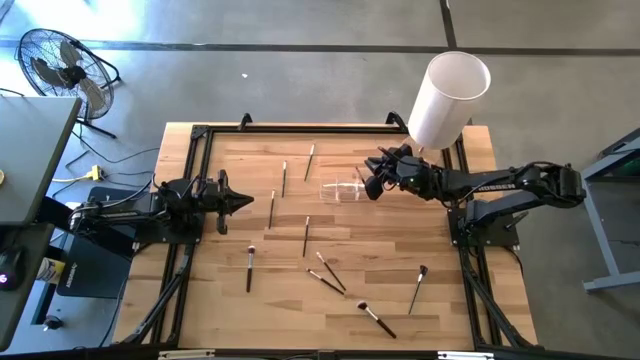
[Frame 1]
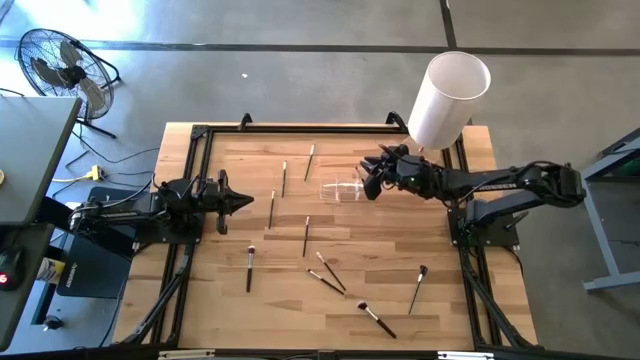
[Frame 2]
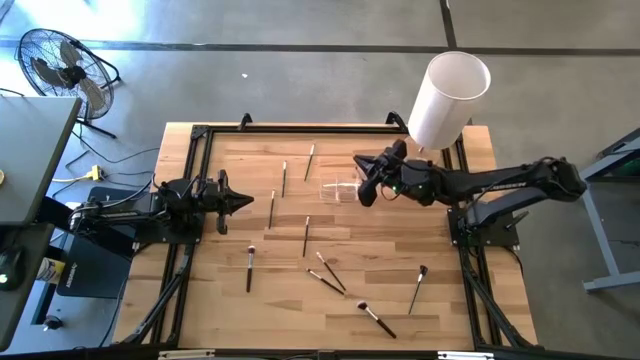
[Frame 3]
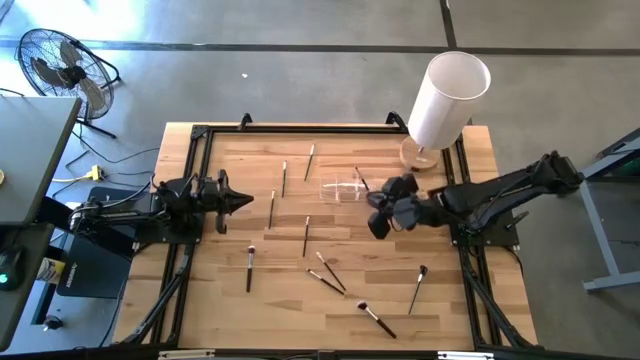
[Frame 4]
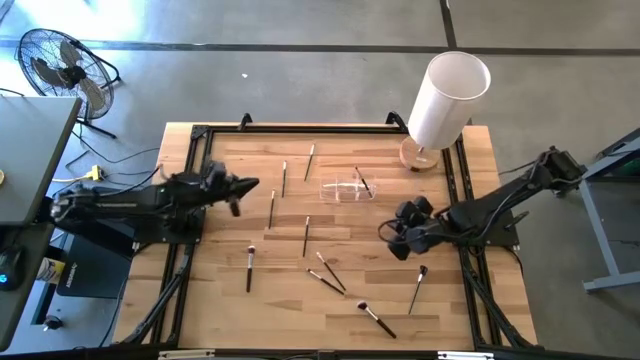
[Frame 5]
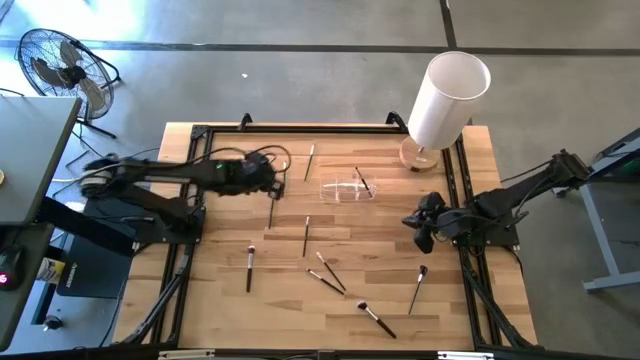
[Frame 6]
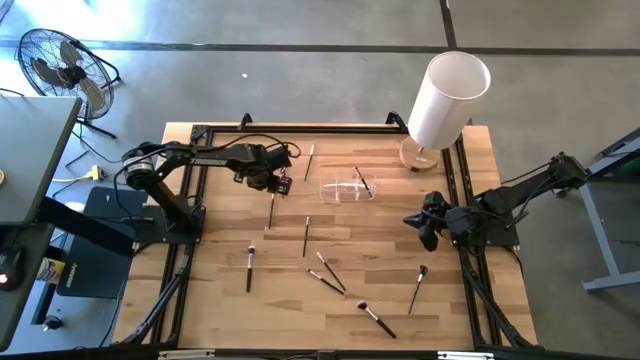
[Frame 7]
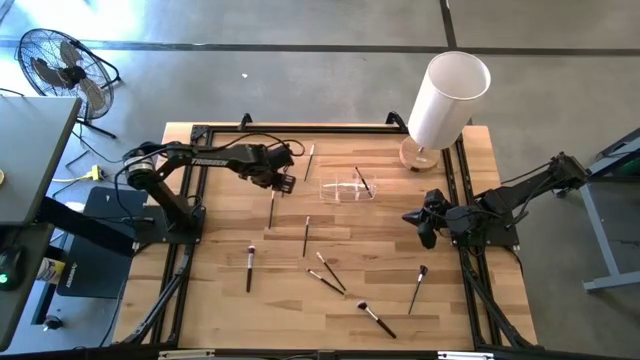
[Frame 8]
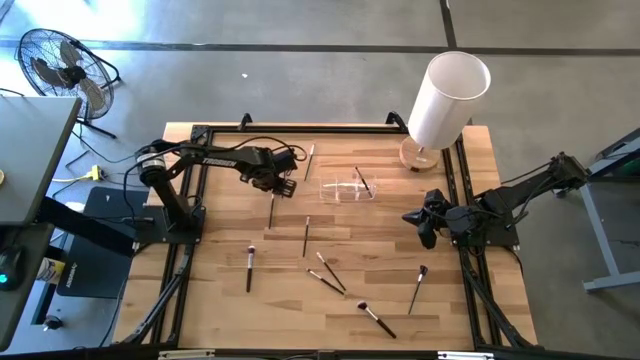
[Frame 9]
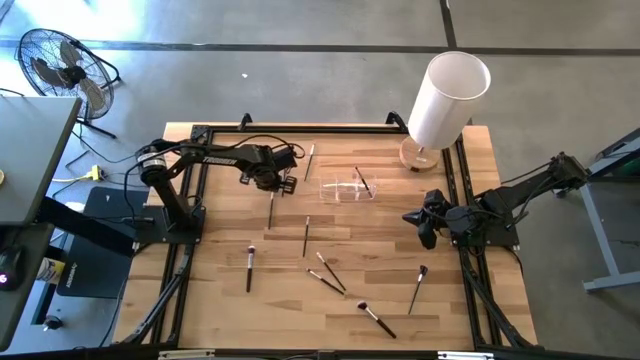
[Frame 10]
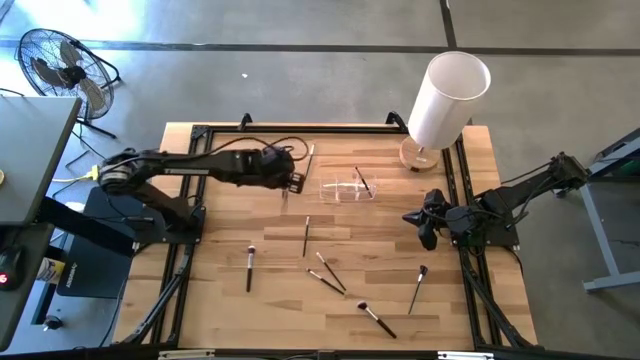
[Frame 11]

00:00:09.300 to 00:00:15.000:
Task: Put items in baskets/containers
Put the eyeshadow brush into the left section of the transparent organizer

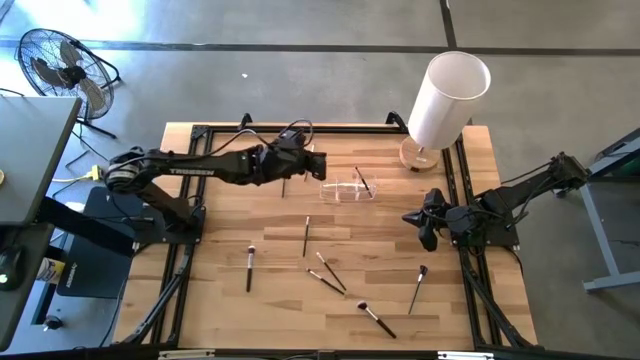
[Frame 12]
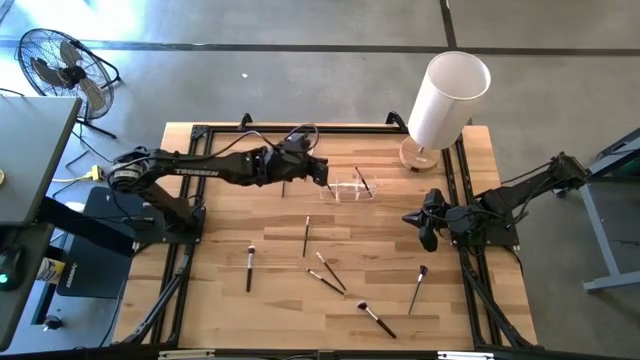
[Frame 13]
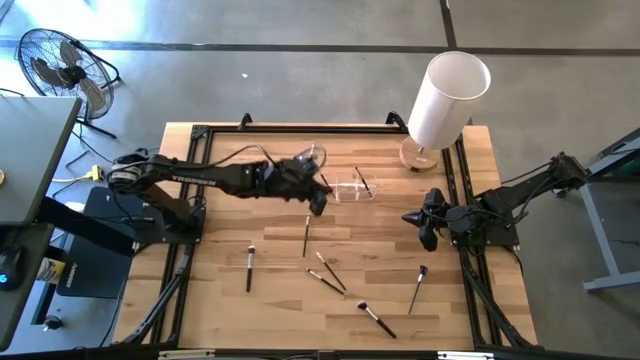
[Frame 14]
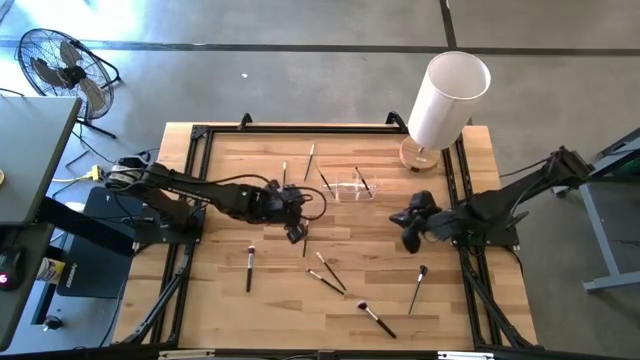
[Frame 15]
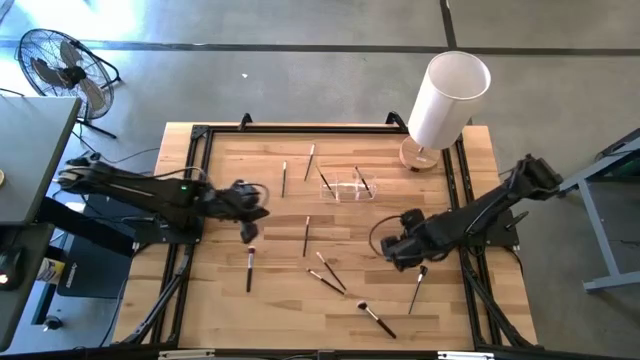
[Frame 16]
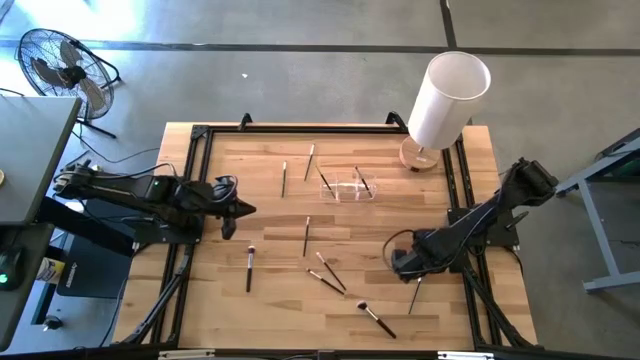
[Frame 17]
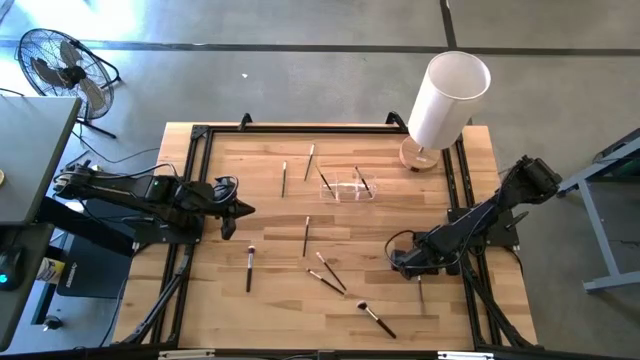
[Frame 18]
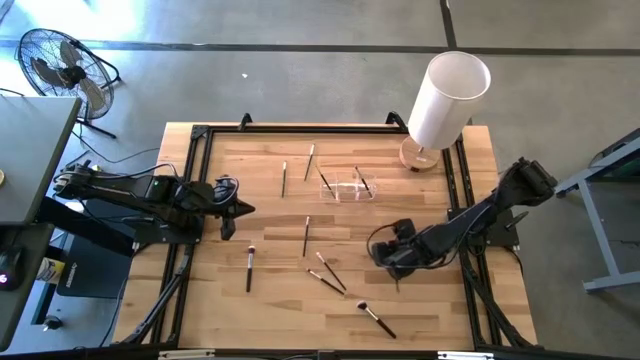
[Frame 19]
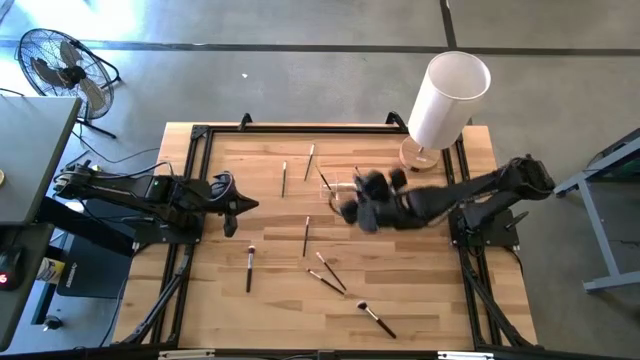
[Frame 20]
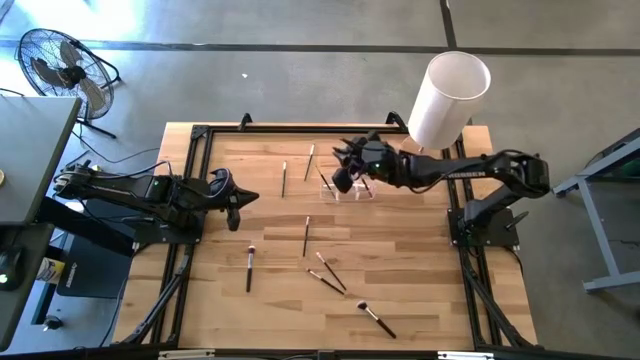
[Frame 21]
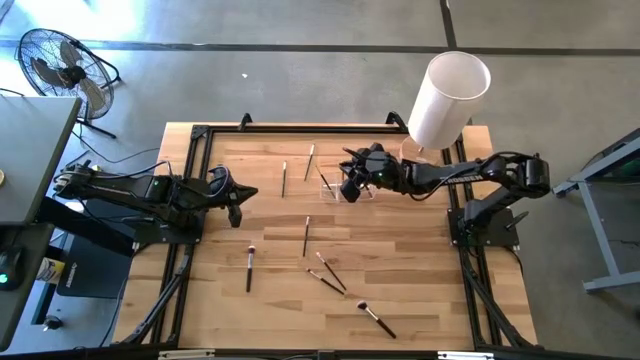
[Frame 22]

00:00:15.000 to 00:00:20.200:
Put the brow brush into the middle section of the transparent organizer

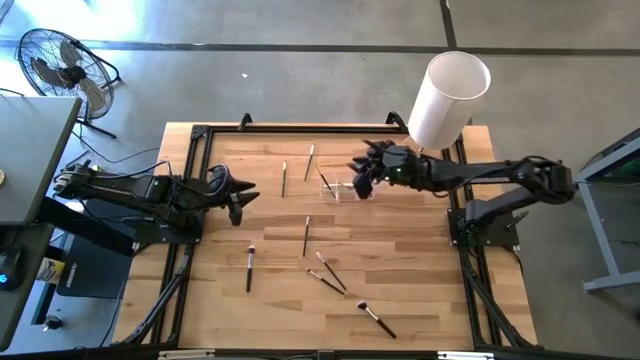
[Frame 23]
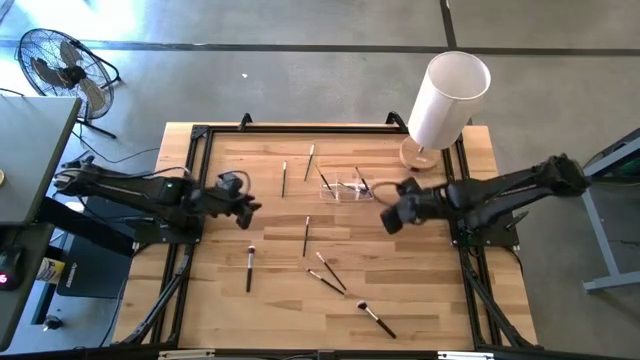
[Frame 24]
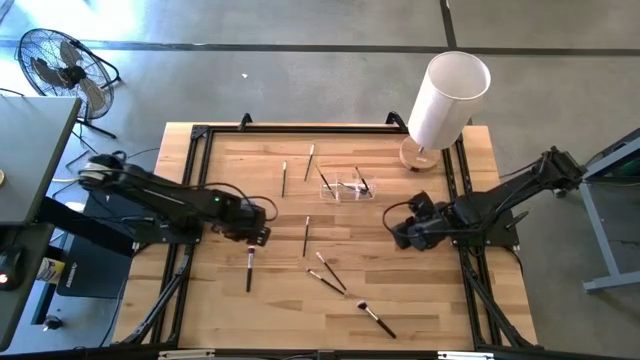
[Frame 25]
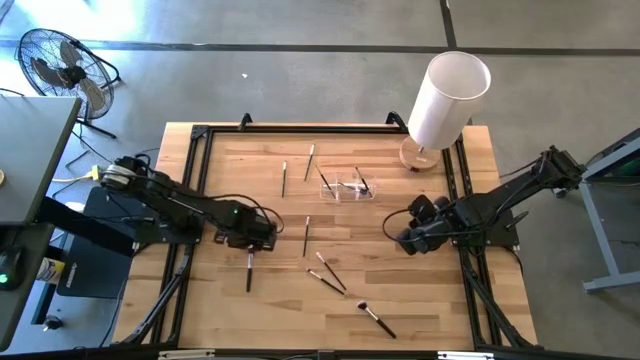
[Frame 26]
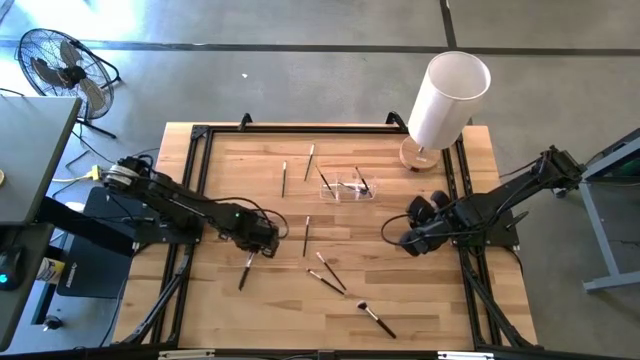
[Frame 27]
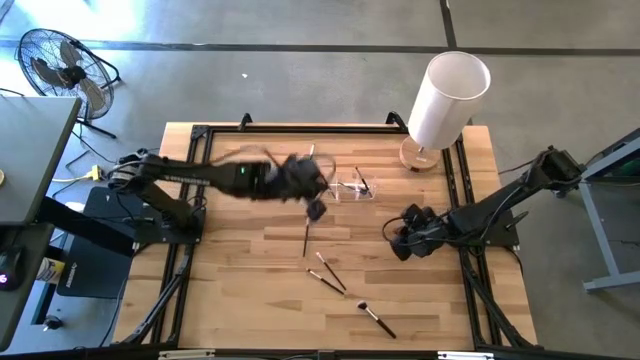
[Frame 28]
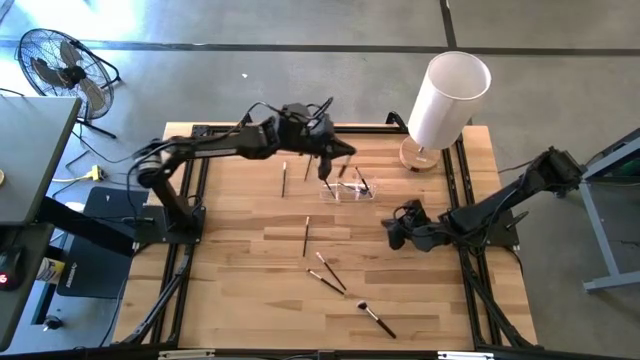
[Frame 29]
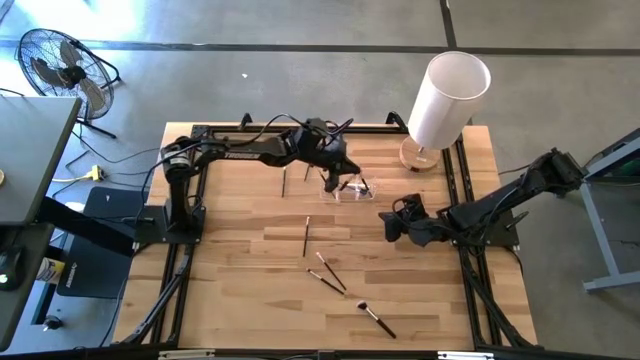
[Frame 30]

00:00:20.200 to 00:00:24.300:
Put the eyeshadow brush into the middle section of the transparent organizer

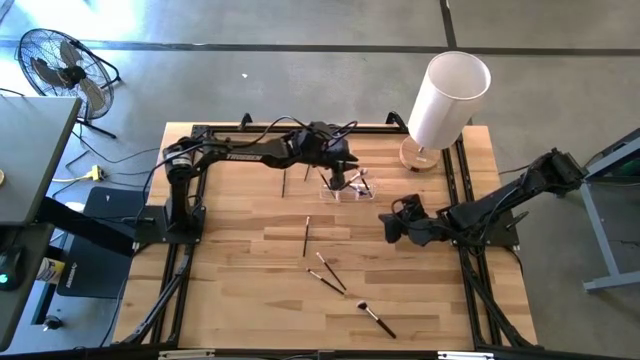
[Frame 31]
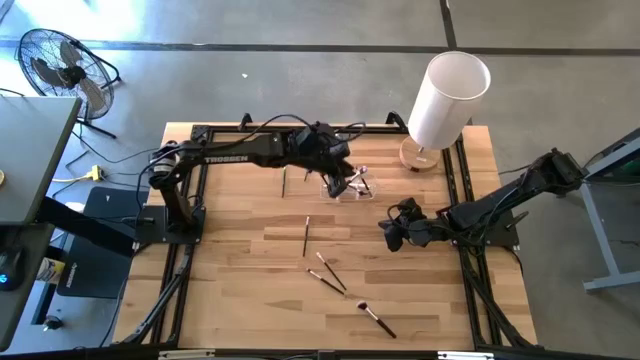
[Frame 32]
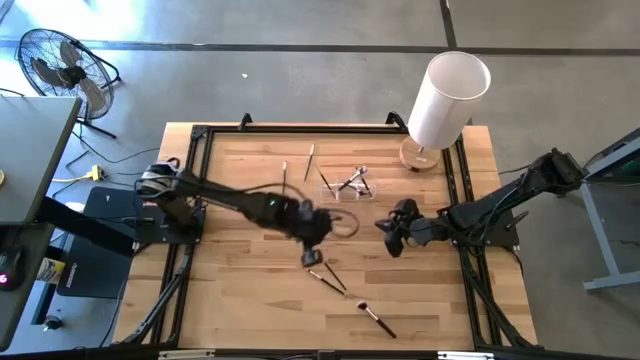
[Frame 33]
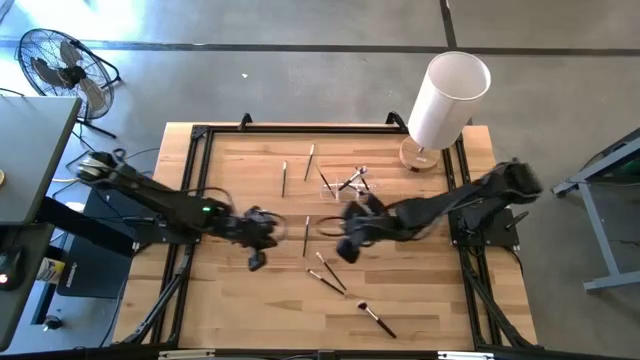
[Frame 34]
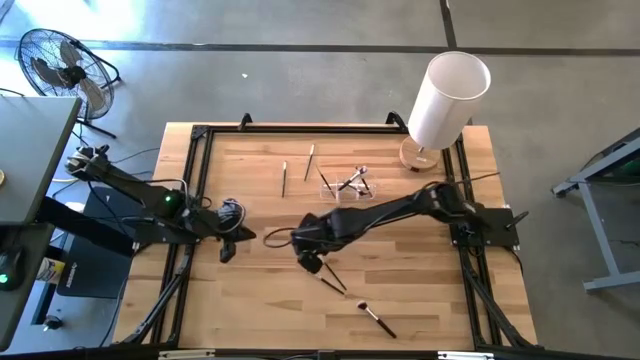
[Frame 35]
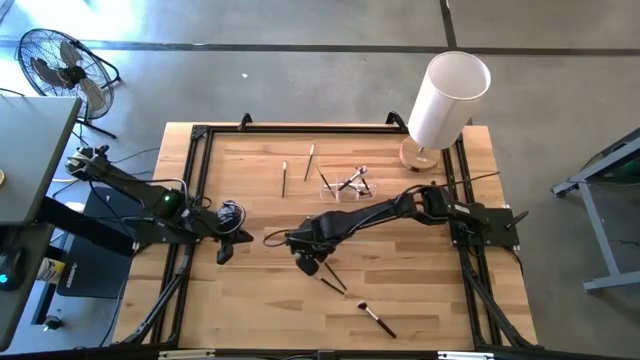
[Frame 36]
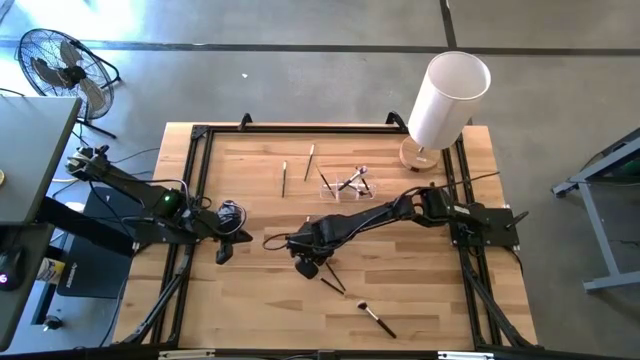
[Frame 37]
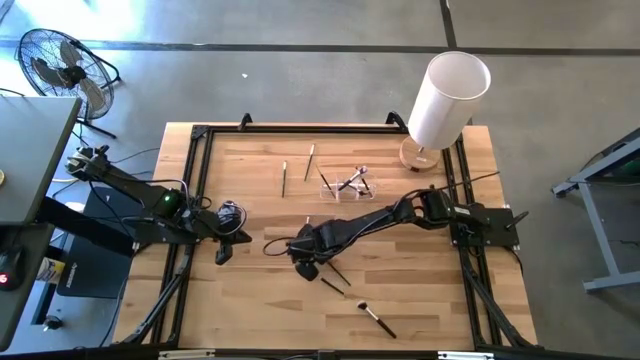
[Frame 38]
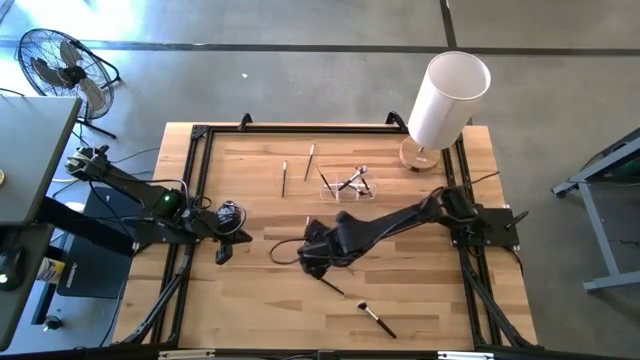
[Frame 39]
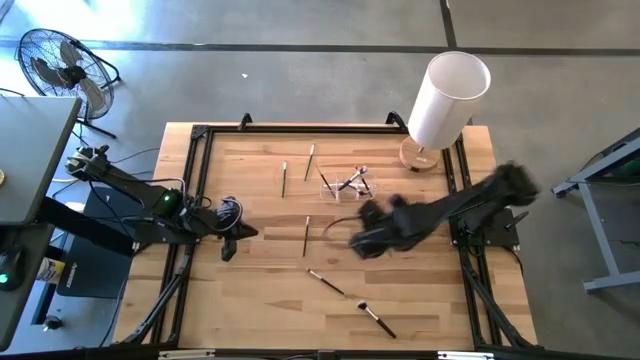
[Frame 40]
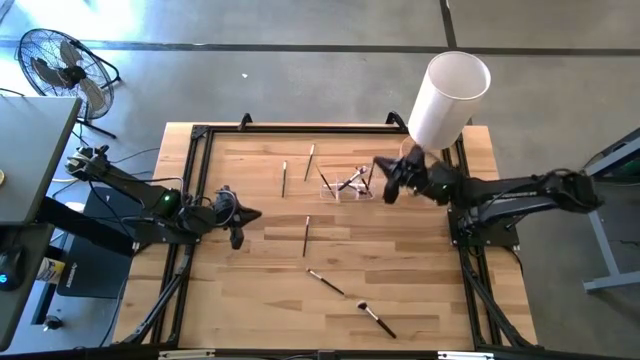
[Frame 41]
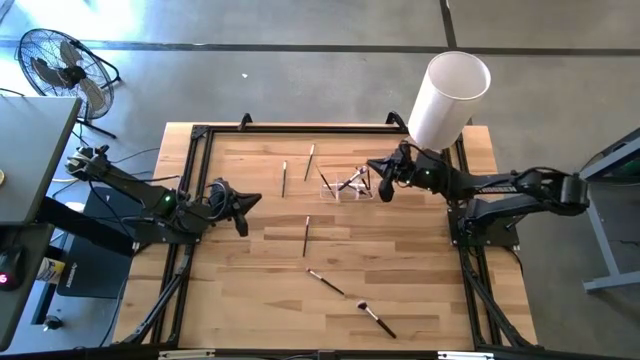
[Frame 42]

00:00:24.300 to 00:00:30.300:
Put the eyeshadow brush into the right section of the transparent organizer
